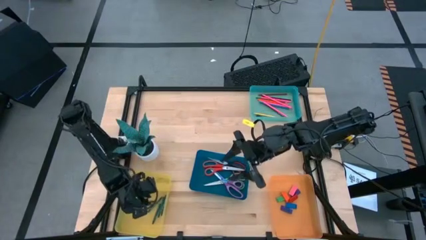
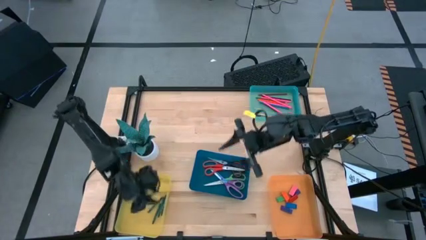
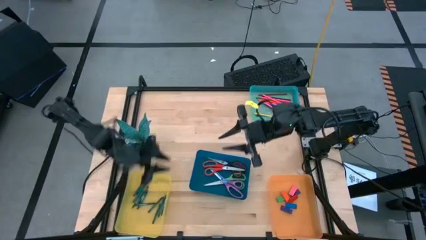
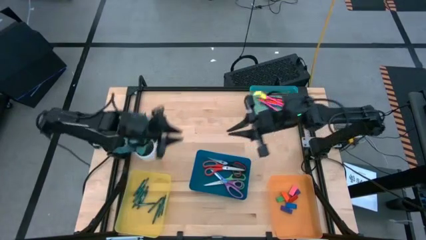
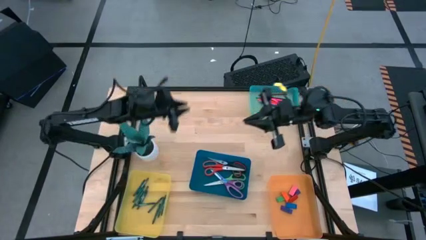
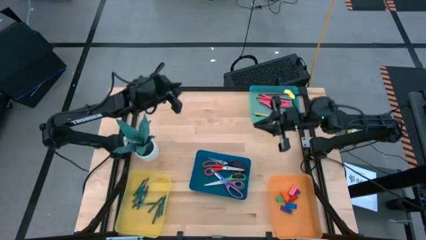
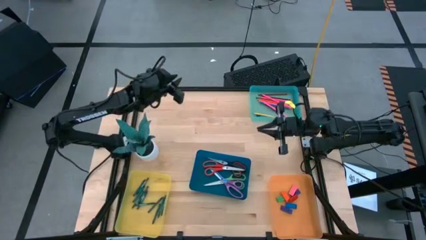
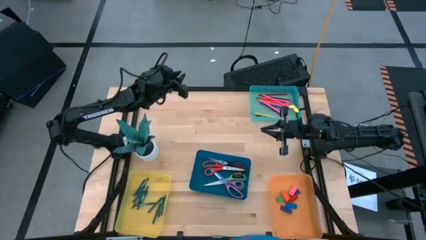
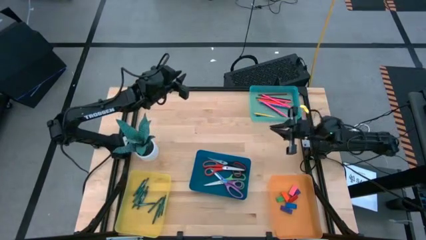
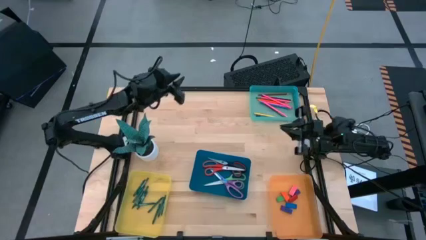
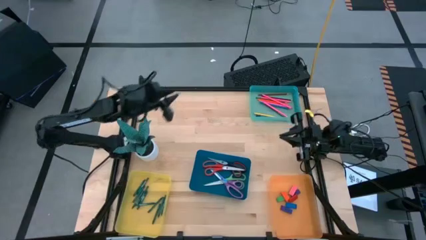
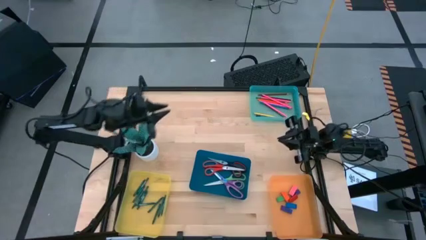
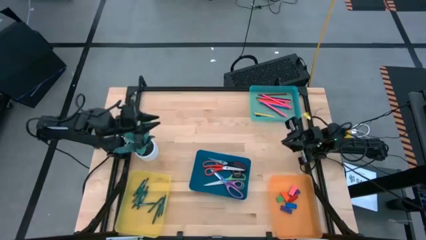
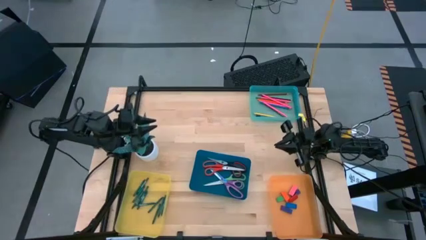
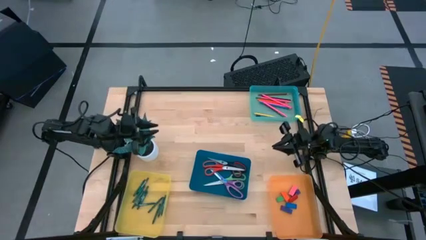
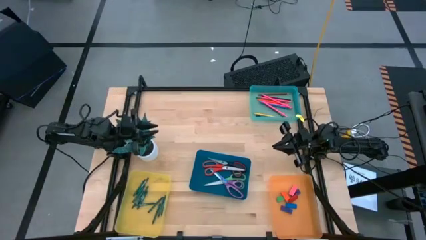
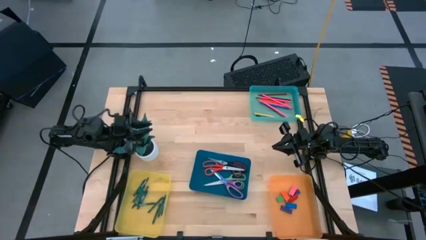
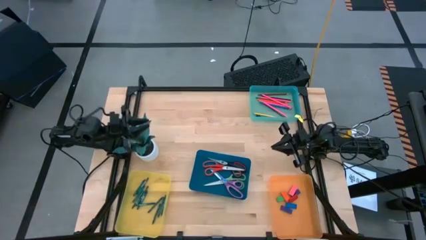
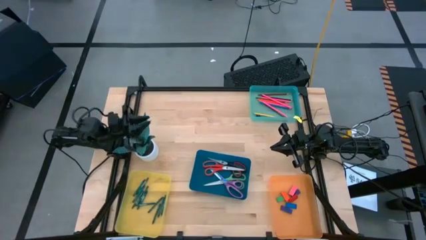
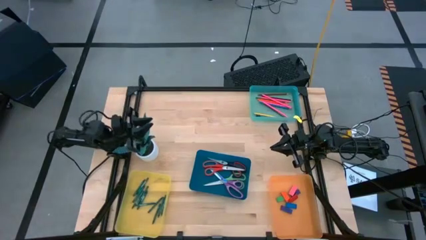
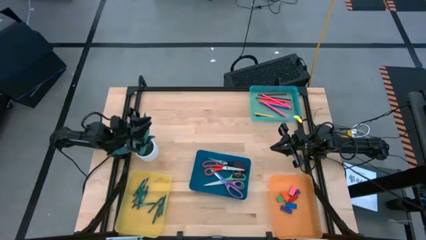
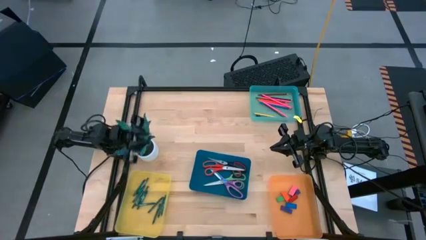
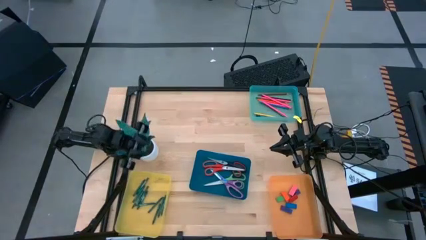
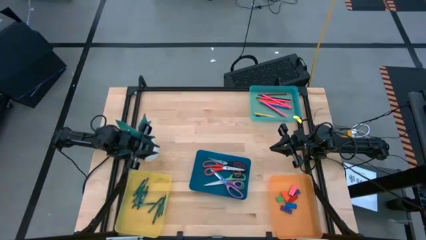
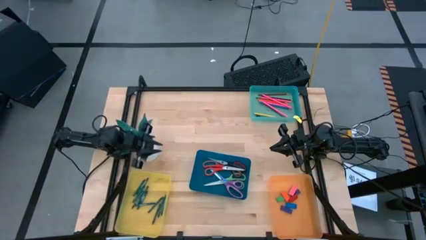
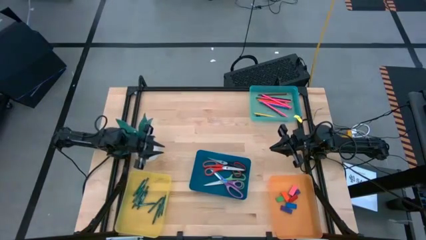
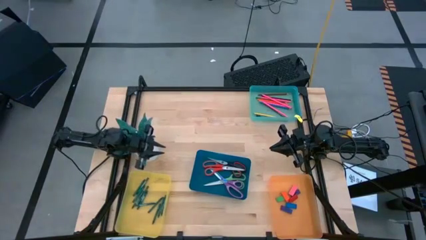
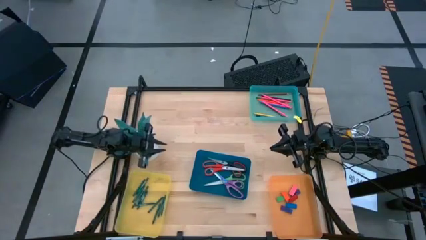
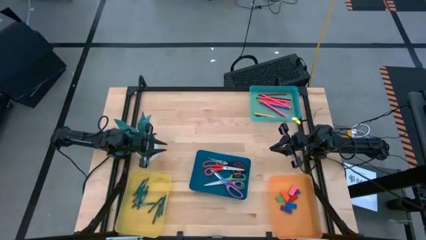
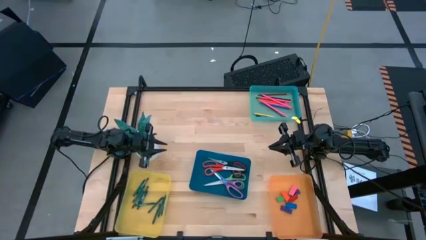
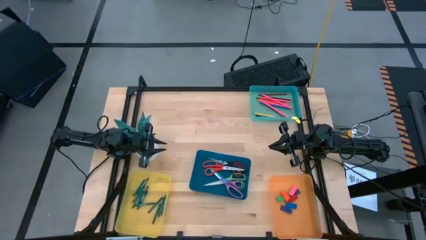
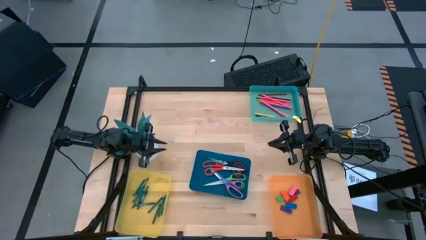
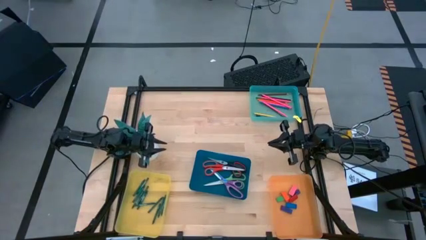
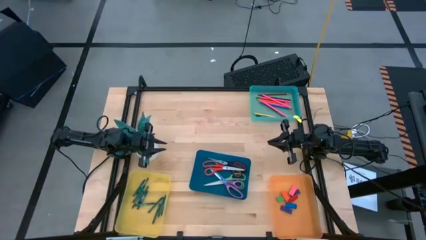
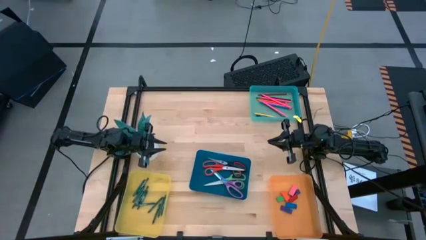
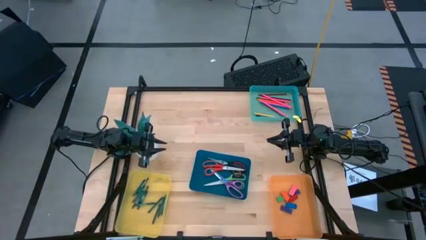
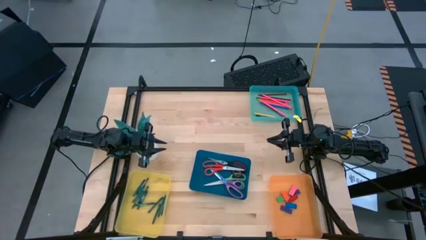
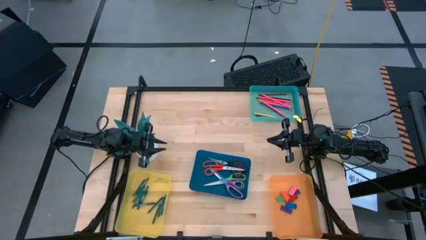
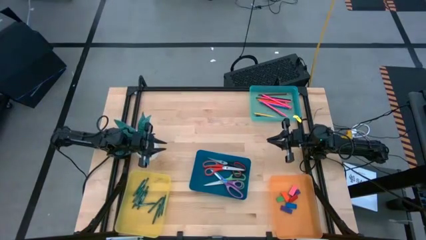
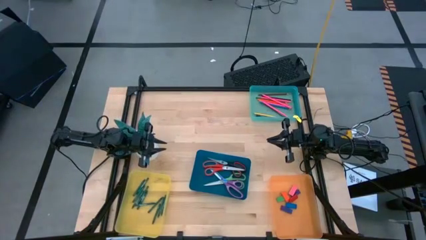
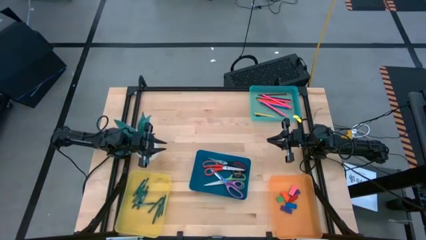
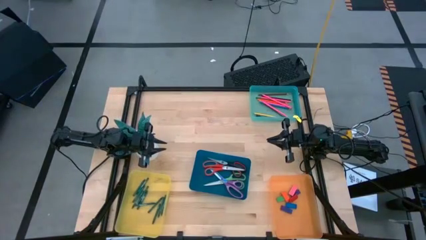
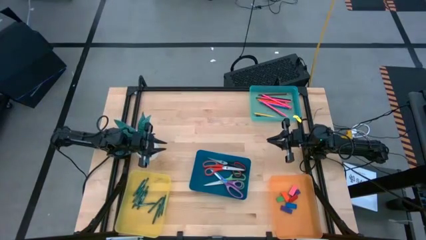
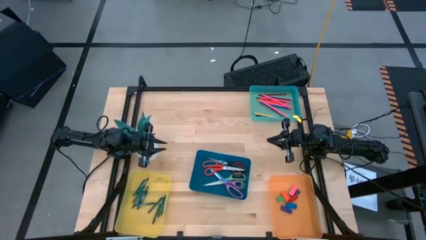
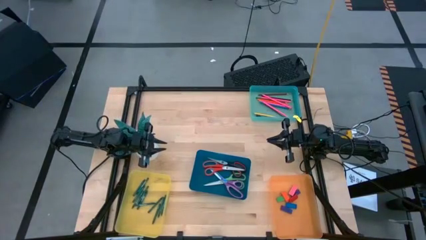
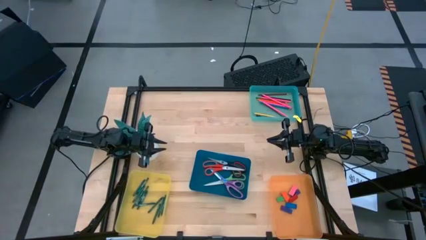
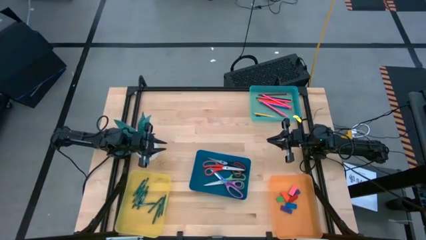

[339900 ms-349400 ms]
Task: Sort crayons/erasers/pens/pencils in bins
Return to Home Position

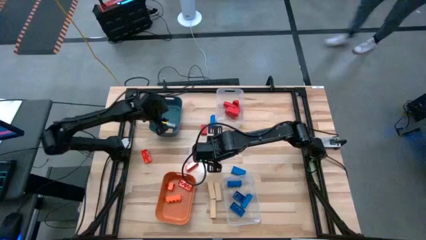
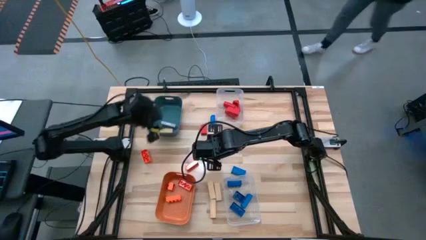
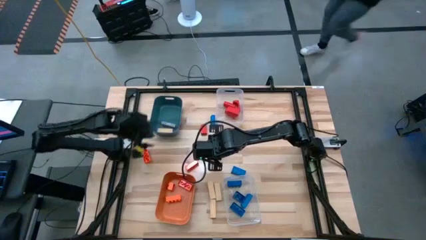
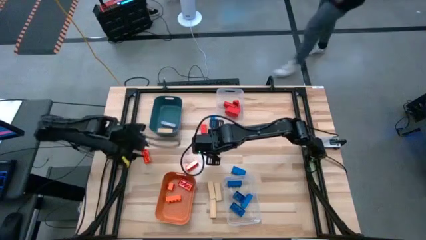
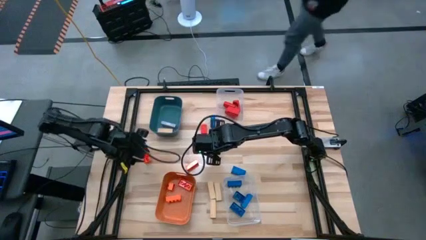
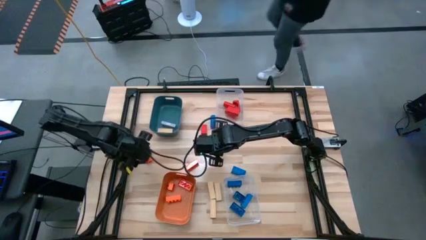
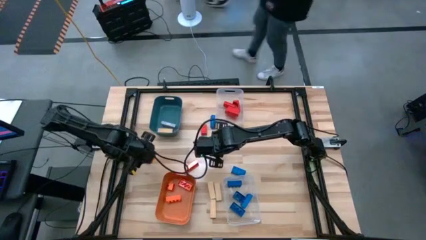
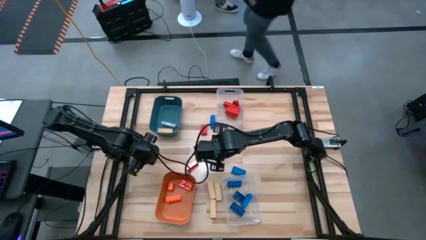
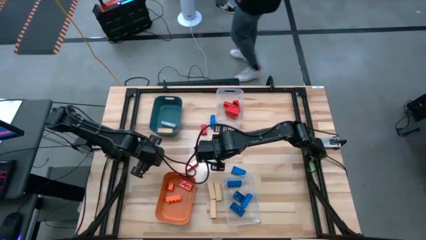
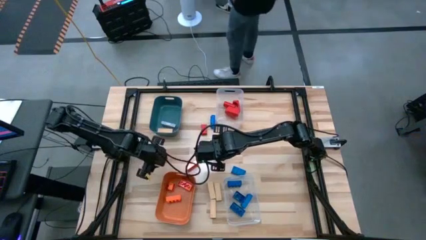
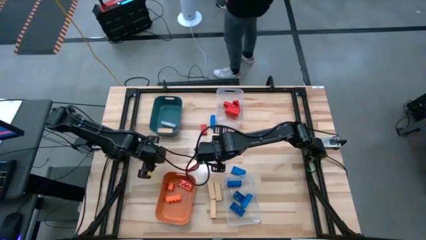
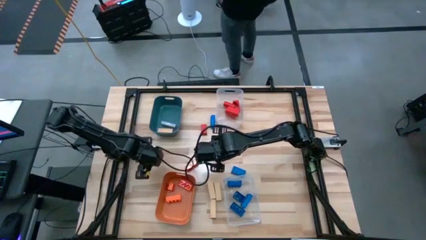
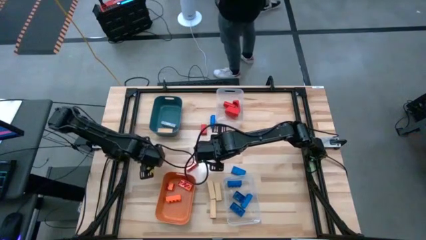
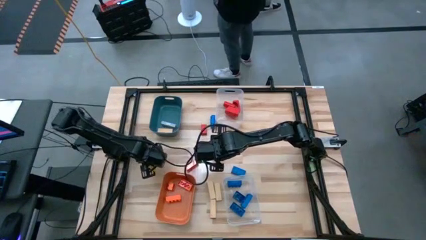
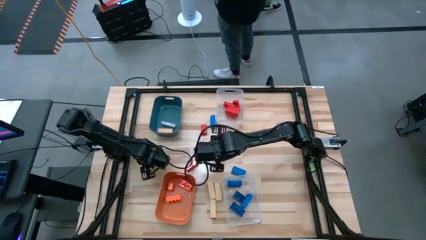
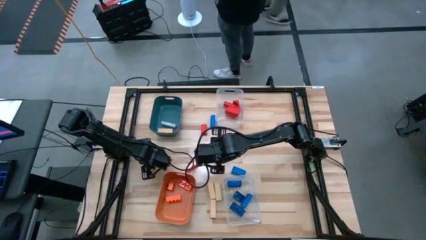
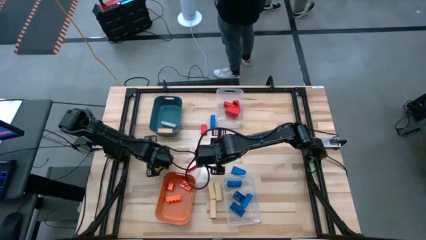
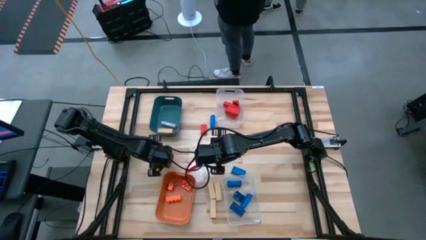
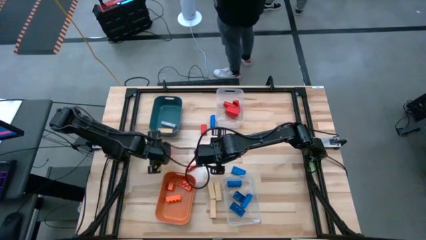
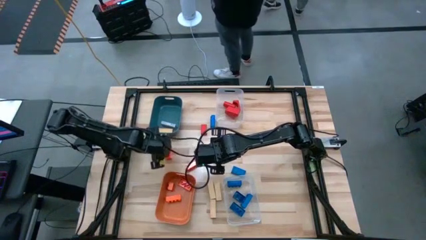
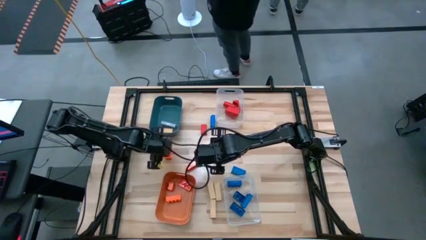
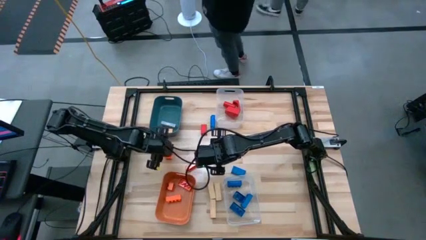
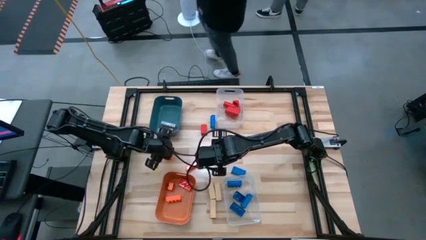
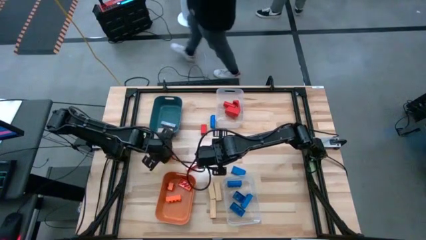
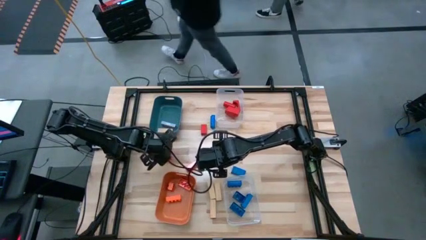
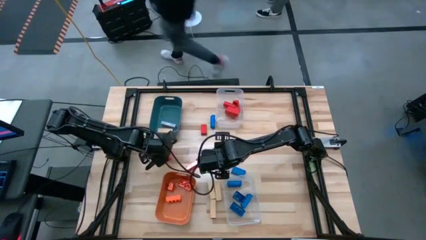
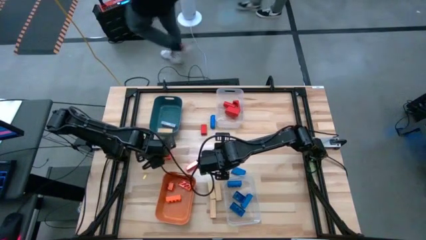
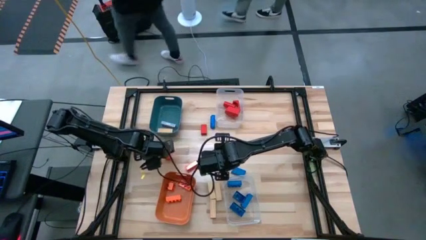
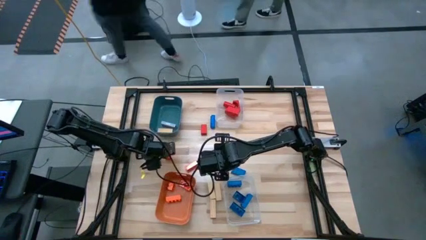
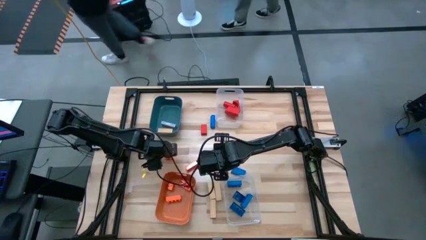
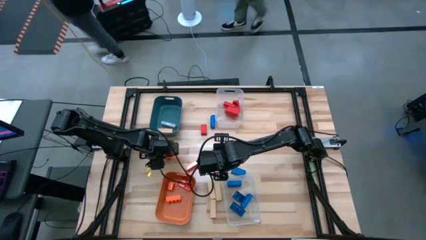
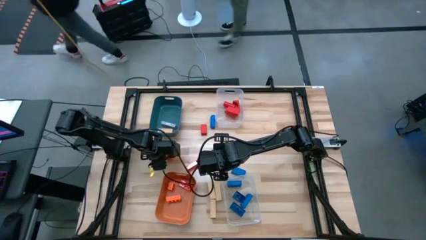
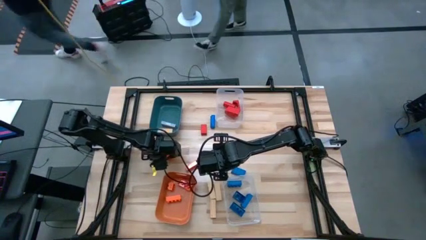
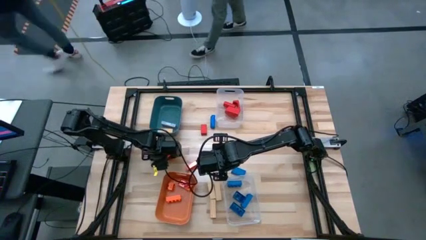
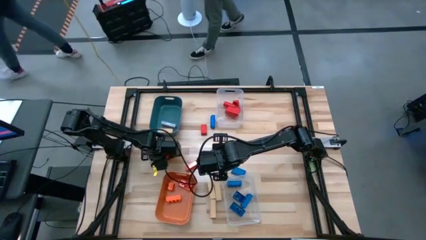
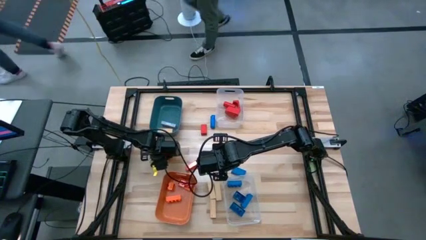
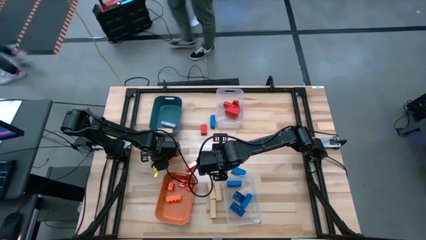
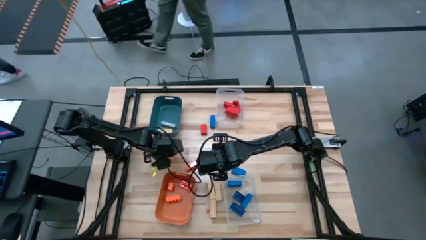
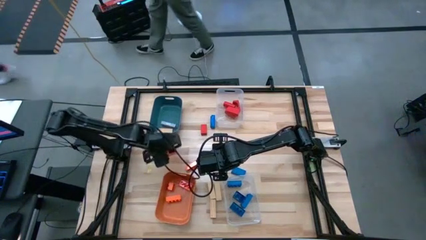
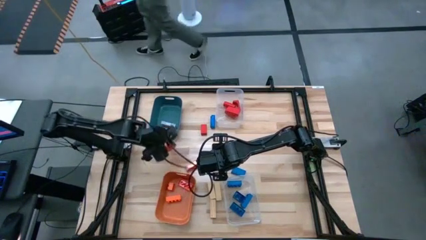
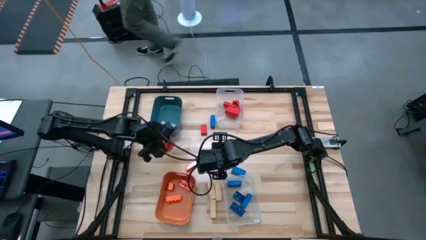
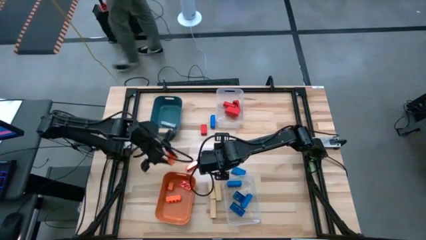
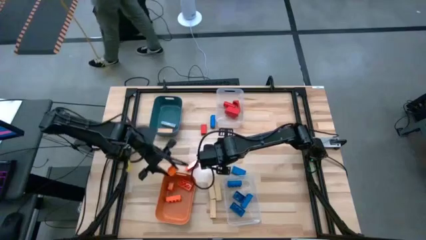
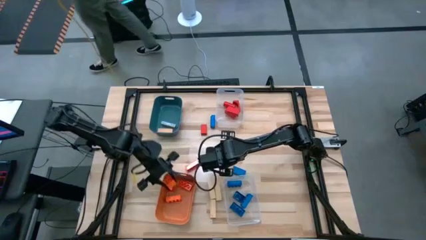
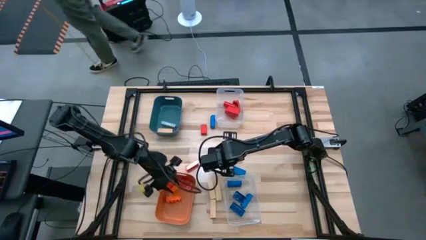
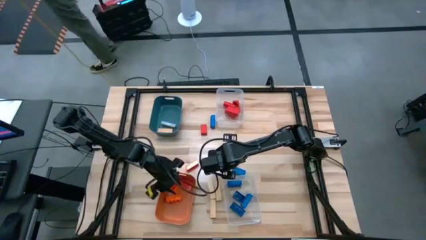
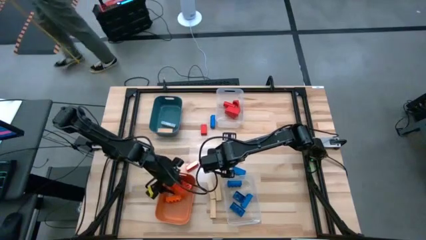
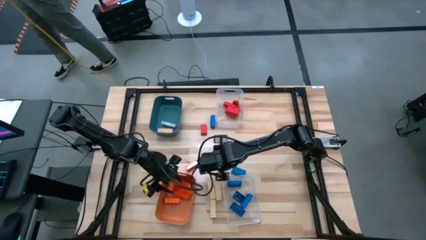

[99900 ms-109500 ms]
Task: Sort blocks
Put the orange game piece into the orange bin
